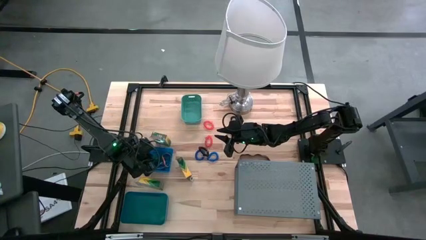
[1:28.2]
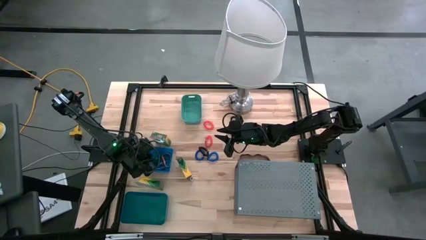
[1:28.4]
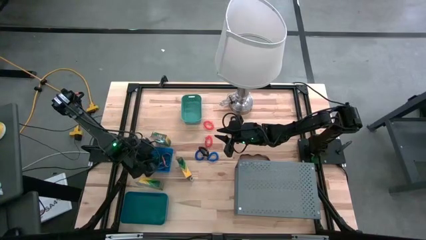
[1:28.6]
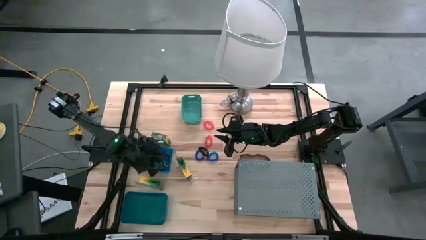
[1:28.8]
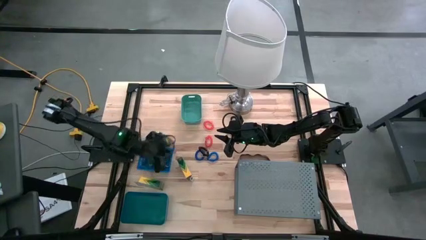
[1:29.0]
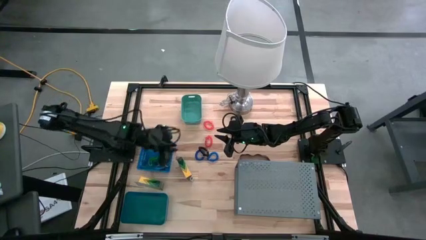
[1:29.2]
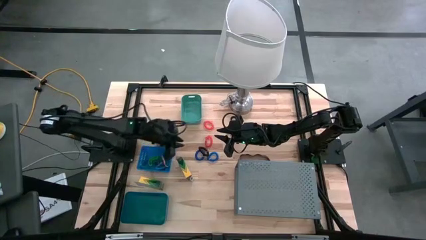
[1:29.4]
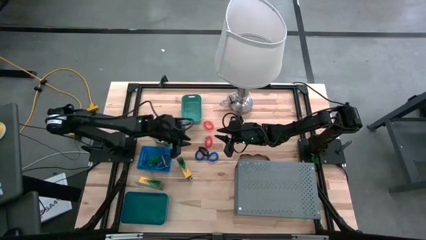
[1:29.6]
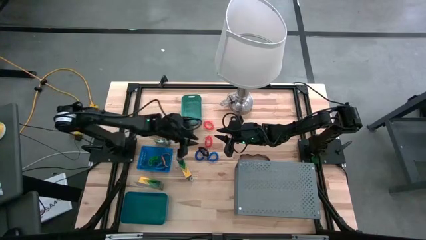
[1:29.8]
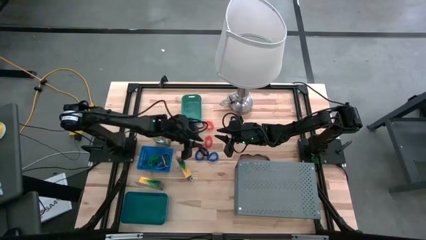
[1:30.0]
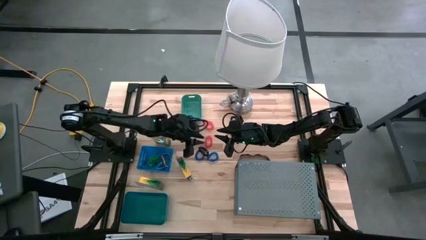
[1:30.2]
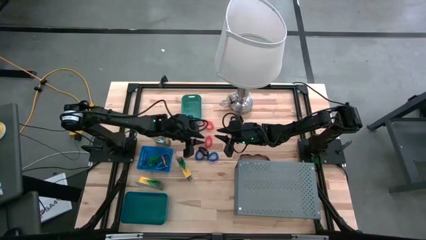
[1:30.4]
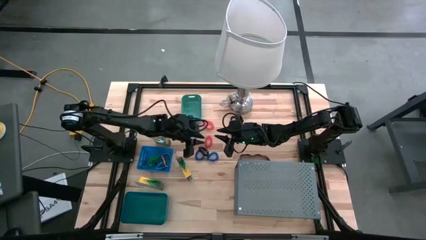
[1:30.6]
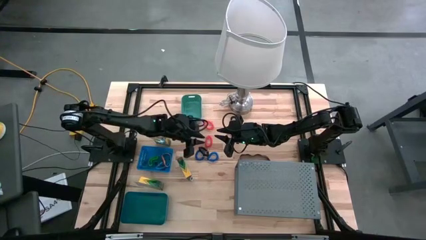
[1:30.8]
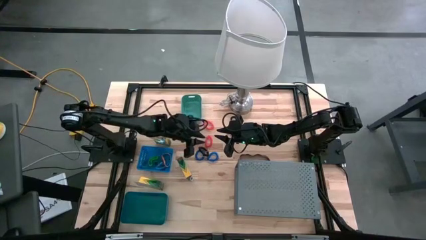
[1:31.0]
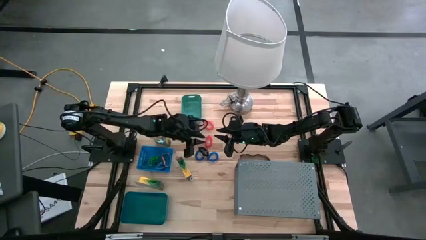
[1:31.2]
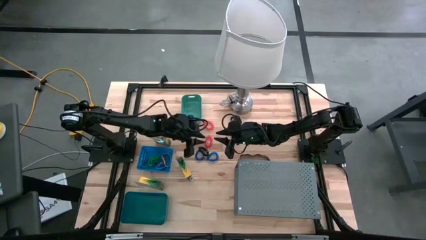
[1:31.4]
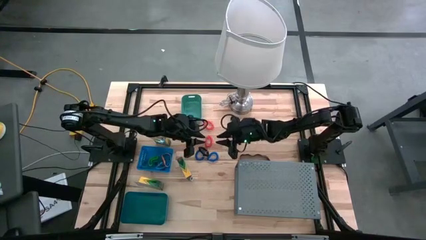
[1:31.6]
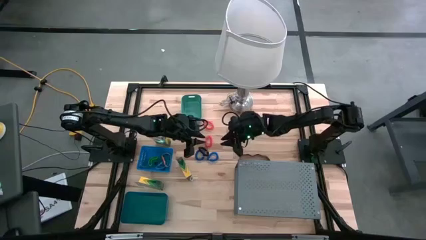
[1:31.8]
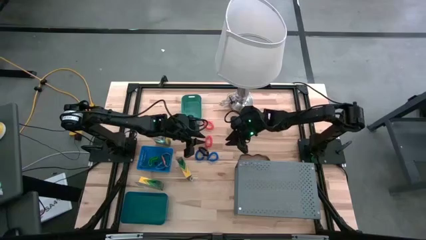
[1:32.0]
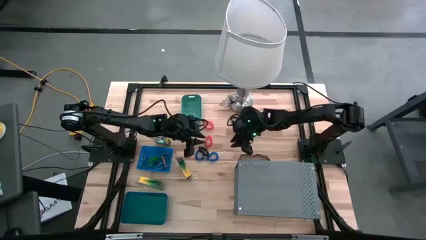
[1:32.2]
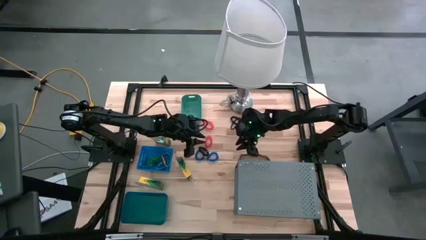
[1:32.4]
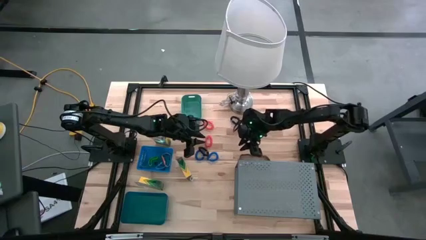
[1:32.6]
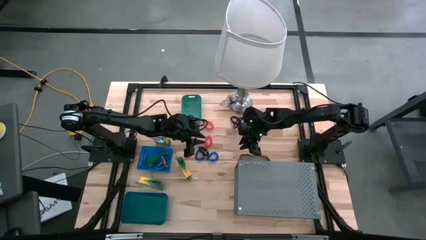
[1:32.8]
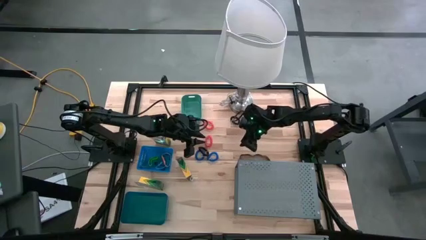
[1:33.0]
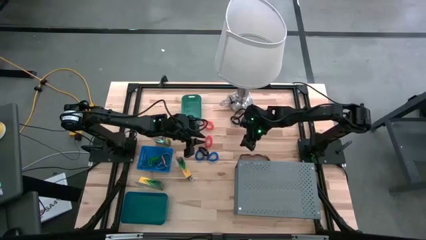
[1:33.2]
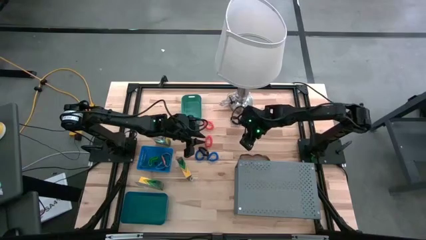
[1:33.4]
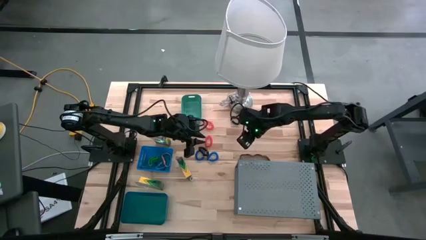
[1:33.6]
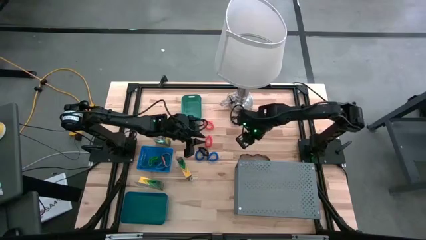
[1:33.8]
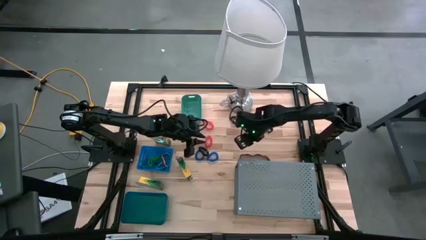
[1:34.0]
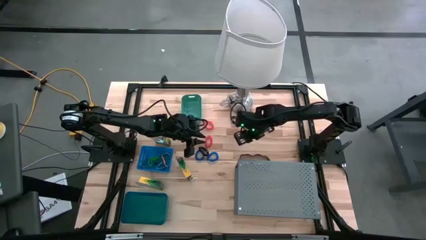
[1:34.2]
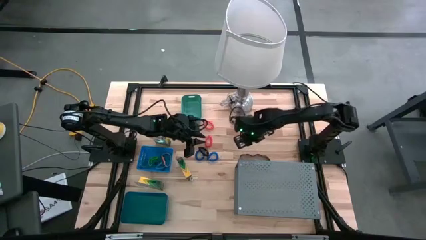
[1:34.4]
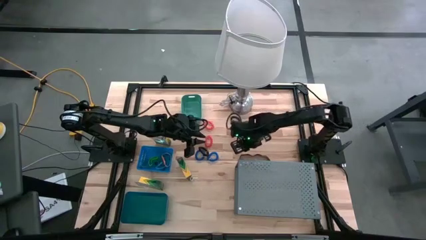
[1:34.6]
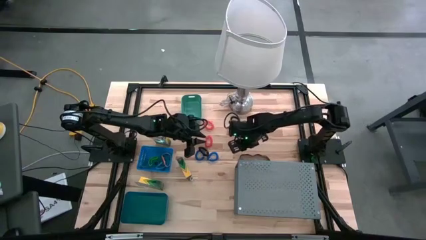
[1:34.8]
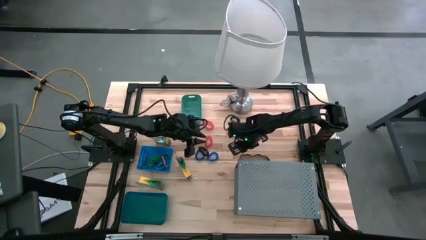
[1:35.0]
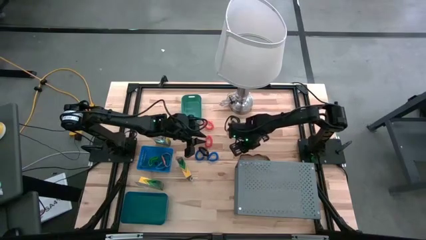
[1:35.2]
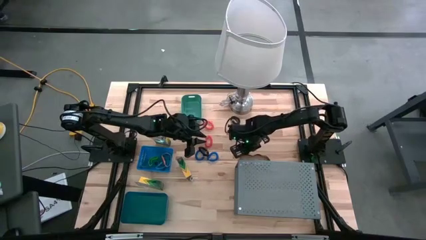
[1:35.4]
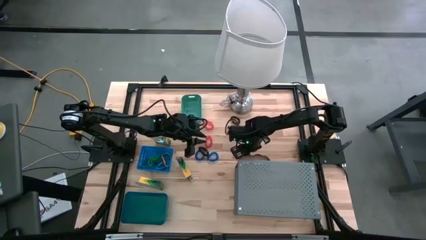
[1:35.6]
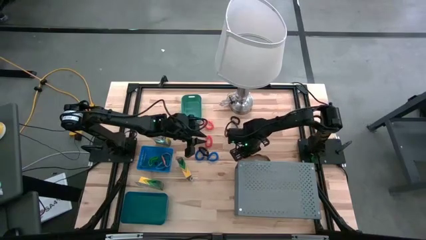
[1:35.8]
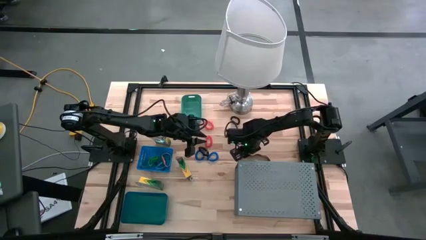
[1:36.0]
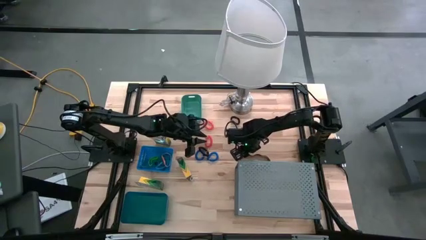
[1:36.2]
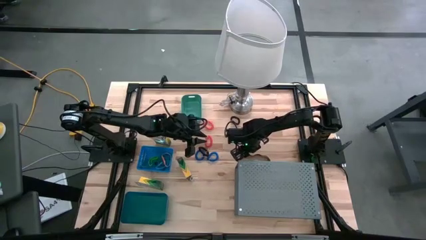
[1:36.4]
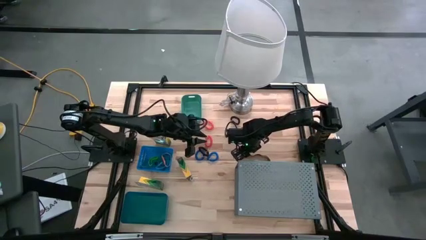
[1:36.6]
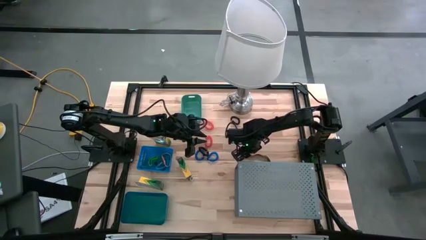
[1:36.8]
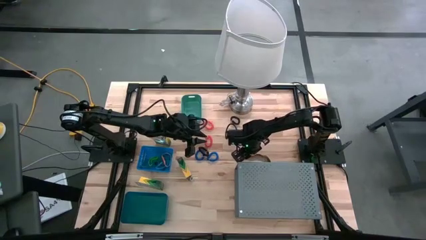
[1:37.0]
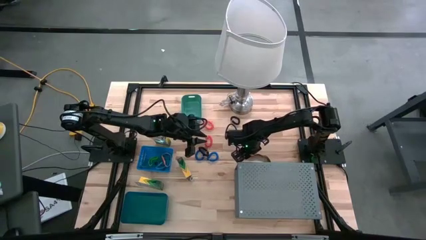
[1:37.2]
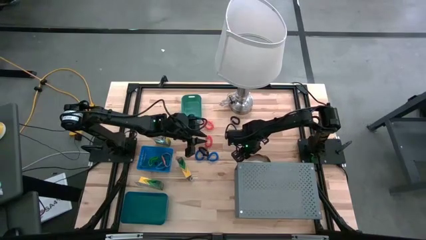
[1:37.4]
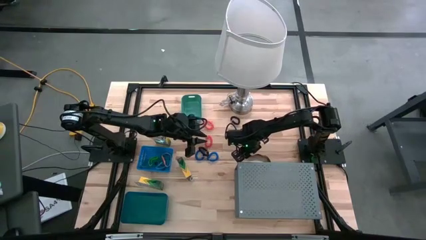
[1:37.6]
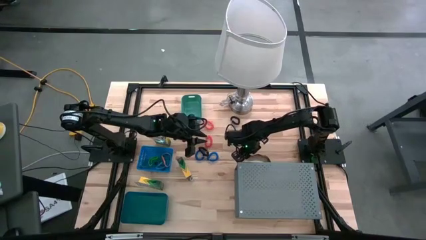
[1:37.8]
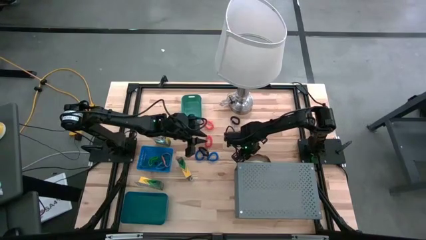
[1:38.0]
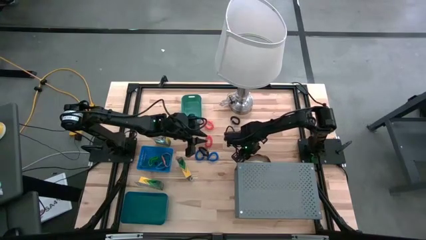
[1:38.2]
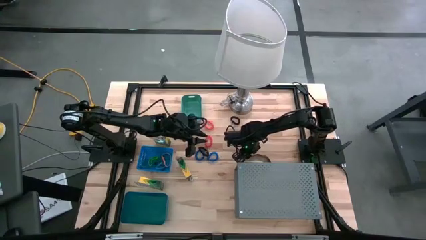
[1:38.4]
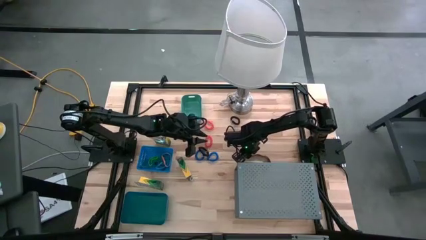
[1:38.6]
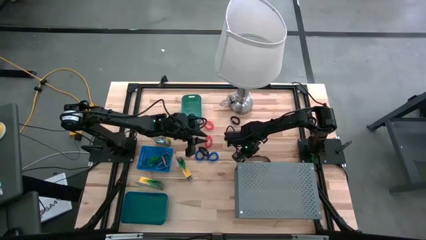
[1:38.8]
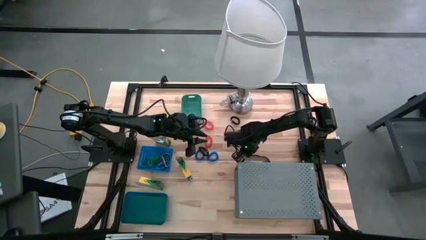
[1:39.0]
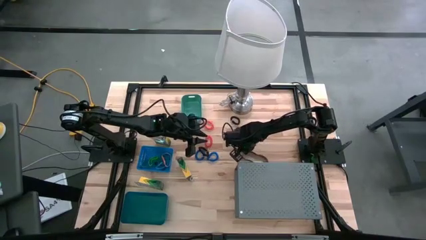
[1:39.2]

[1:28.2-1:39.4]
Task: Pick & Place Office Desk Supplies
Put the black rubber bands into the top blue bin

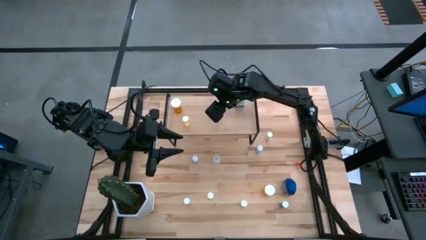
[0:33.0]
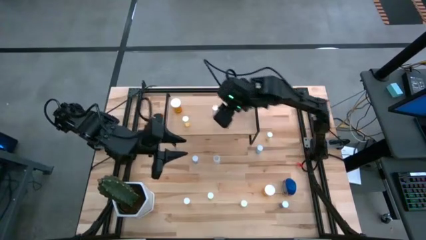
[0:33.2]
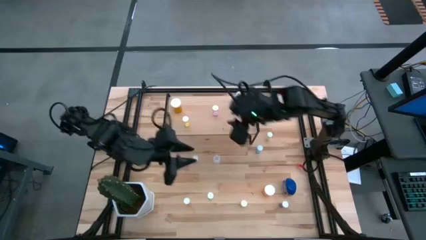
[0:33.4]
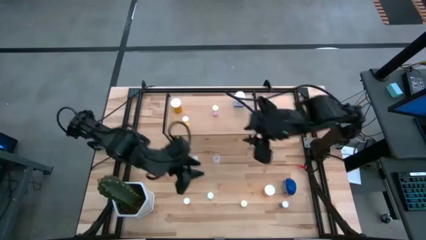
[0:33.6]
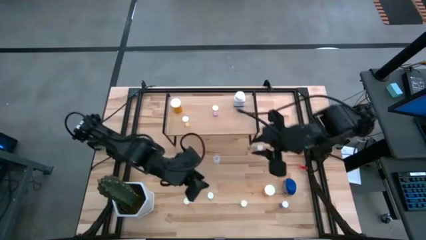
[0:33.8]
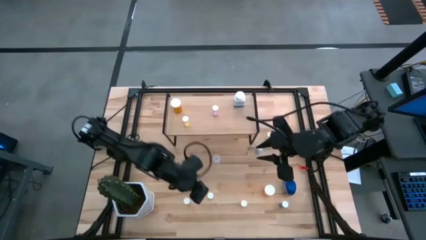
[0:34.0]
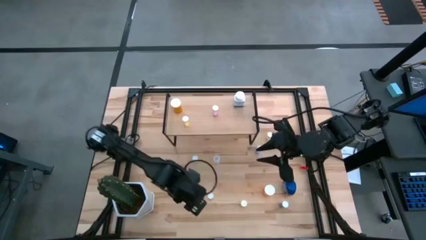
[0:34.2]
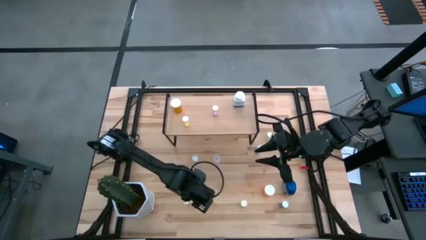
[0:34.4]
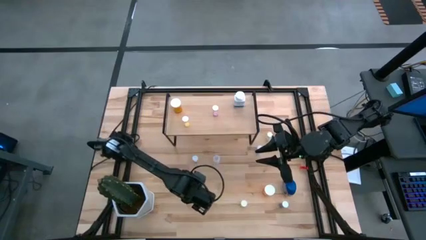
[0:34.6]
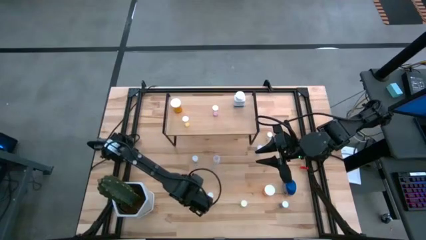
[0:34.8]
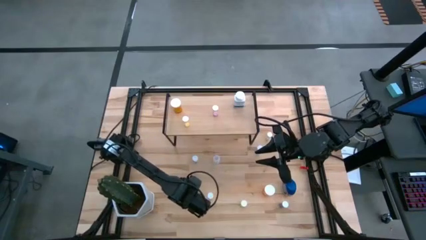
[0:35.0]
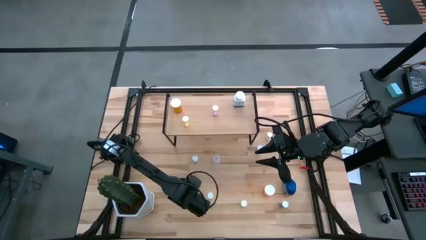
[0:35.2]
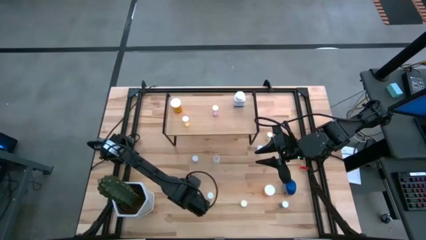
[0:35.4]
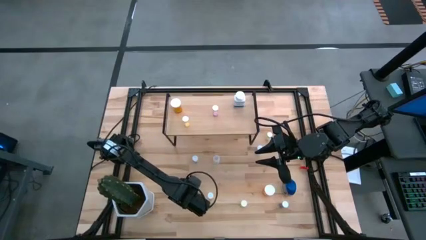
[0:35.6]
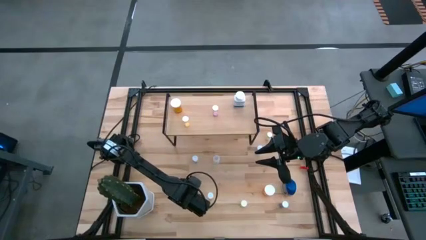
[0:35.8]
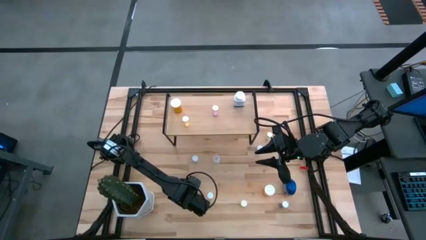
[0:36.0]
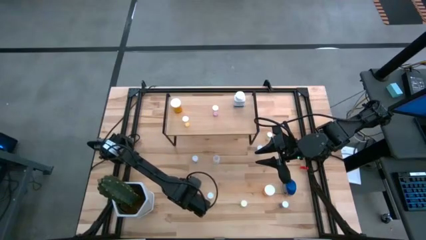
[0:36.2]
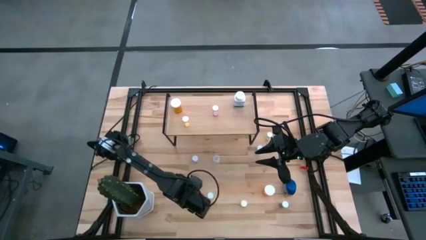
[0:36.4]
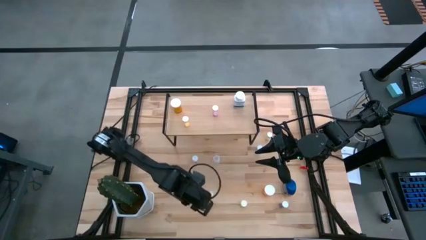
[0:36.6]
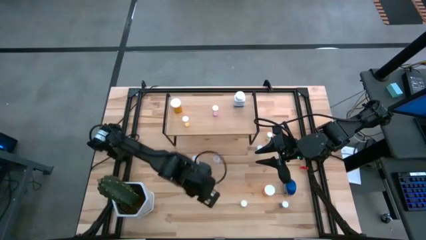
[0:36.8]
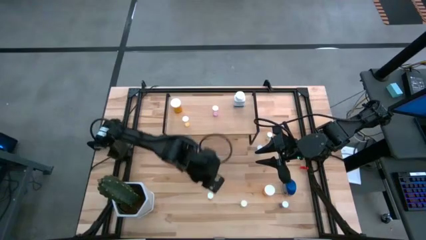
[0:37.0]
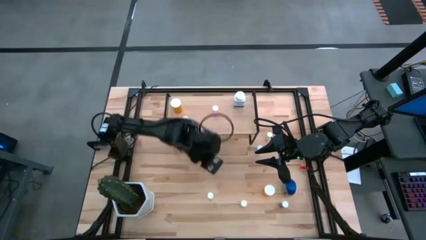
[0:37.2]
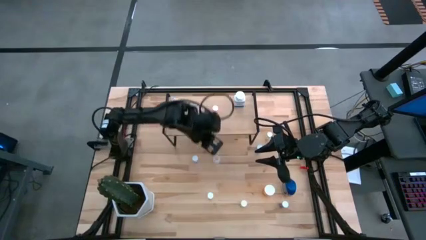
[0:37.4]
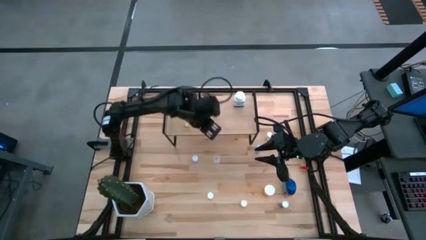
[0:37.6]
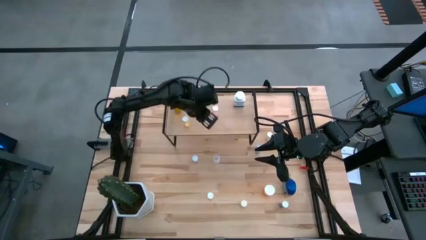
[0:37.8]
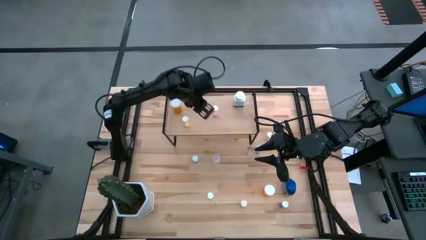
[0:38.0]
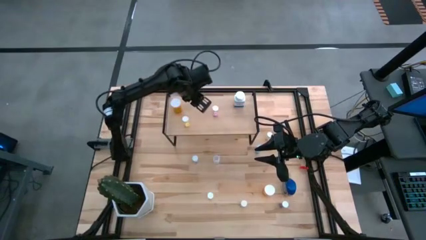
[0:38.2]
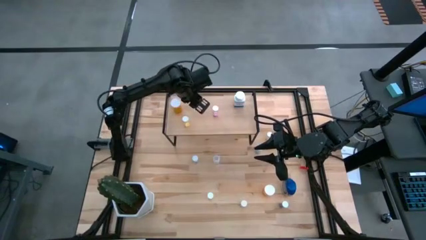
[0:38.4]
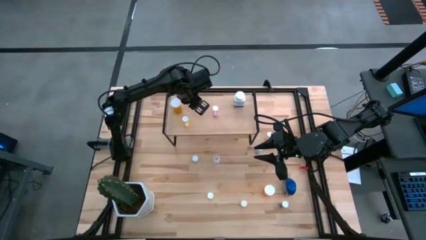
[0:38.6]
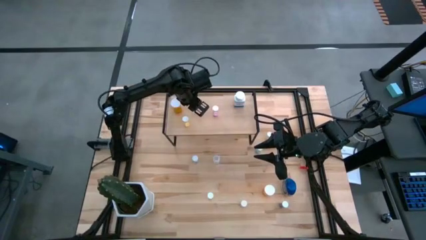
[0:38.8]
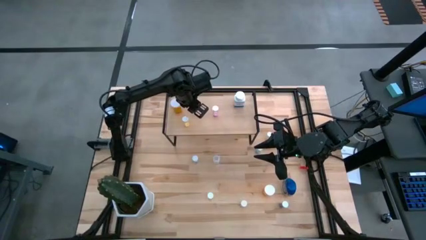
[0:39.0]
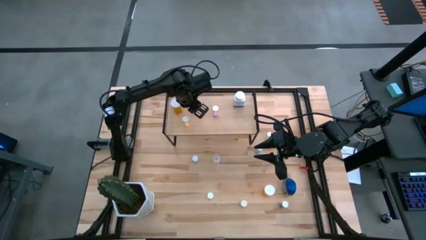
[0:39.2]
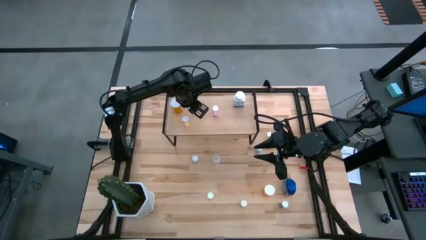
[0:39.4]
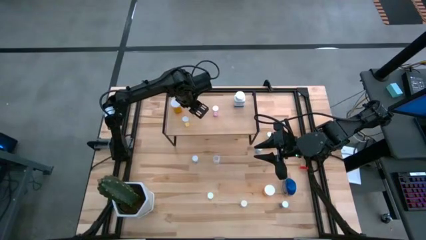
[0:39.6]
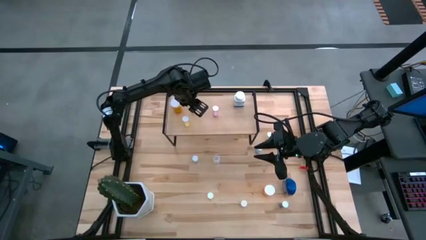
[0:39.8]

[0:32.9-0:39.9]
Task: Pick and place medicine bottles onto shelf by color
Put the yellow pill bottle on the shelf
